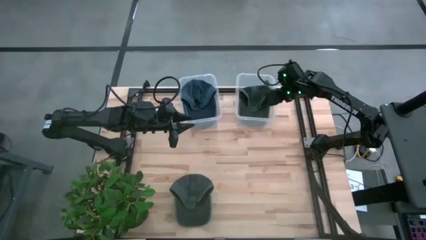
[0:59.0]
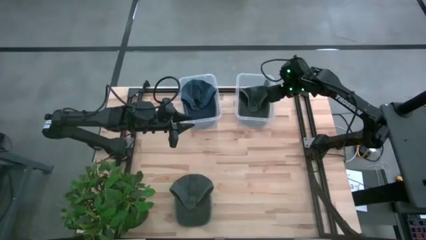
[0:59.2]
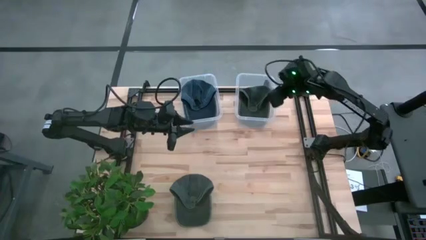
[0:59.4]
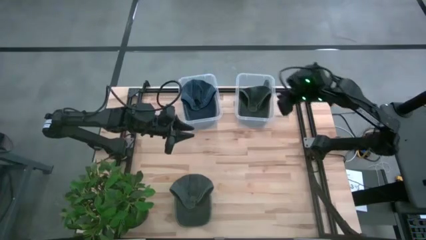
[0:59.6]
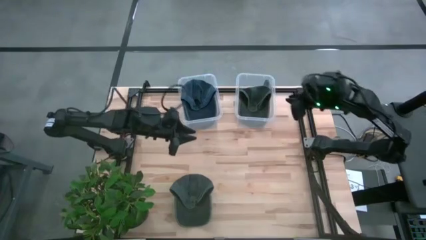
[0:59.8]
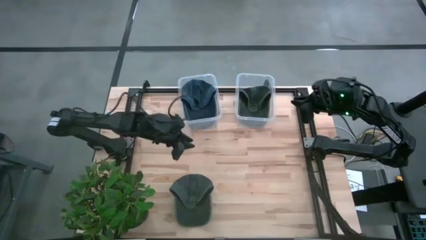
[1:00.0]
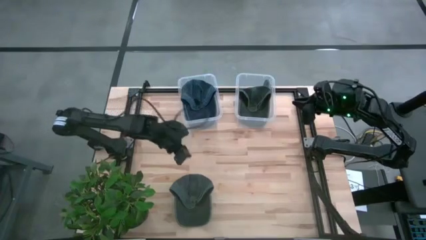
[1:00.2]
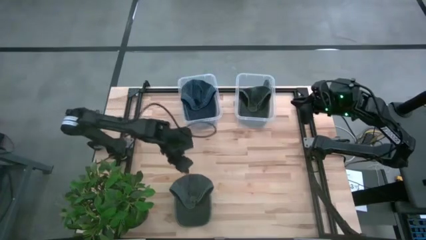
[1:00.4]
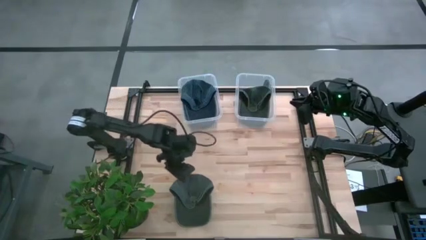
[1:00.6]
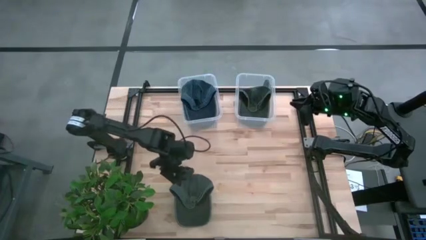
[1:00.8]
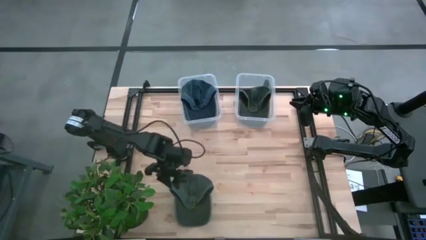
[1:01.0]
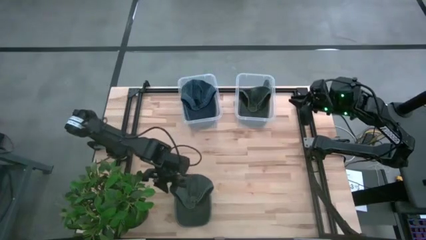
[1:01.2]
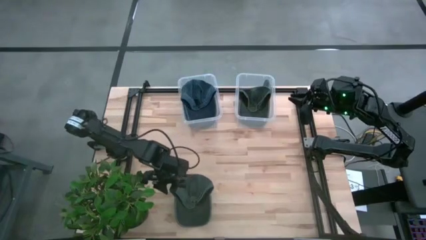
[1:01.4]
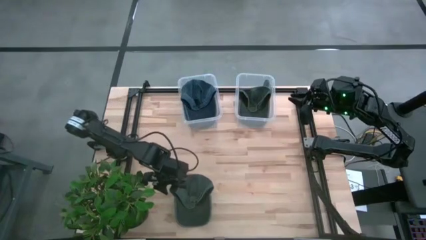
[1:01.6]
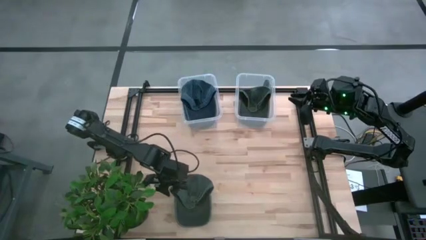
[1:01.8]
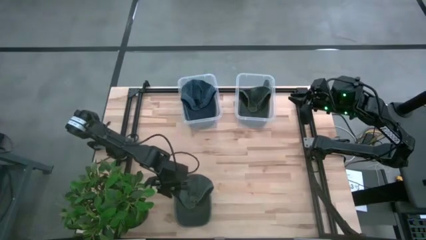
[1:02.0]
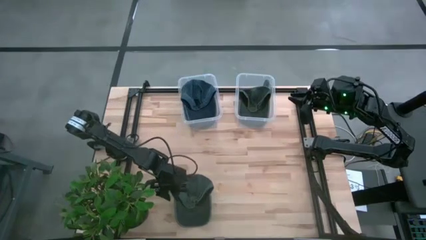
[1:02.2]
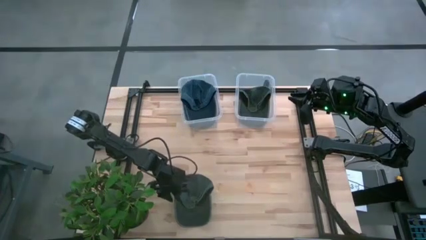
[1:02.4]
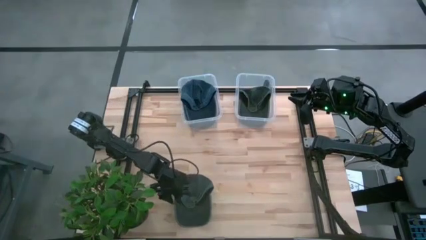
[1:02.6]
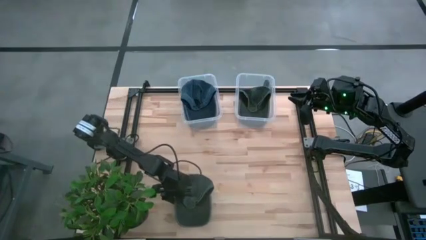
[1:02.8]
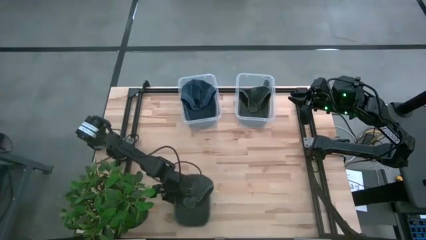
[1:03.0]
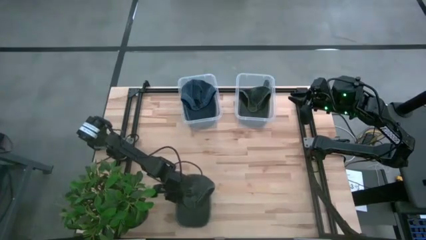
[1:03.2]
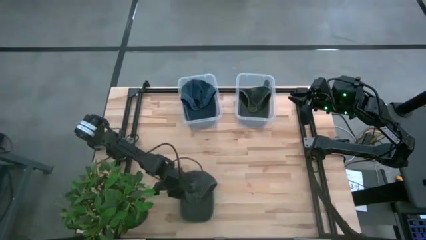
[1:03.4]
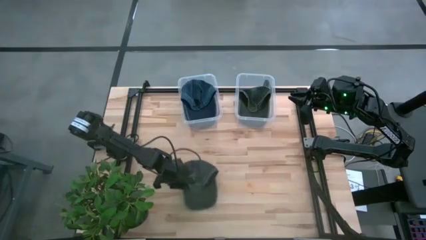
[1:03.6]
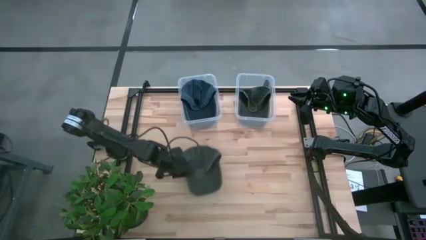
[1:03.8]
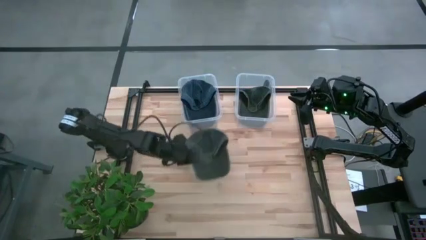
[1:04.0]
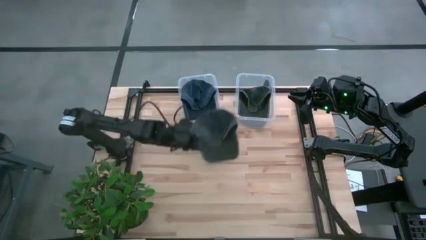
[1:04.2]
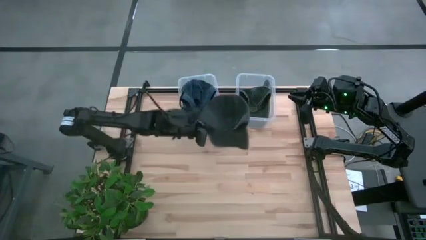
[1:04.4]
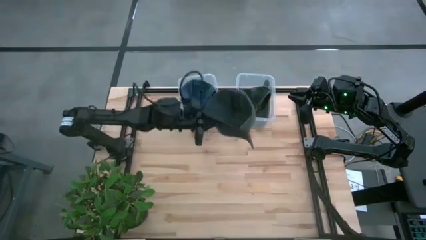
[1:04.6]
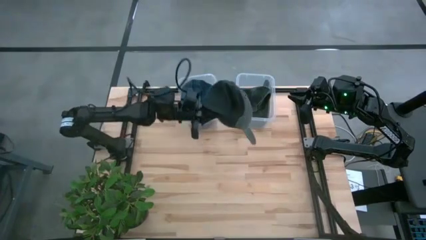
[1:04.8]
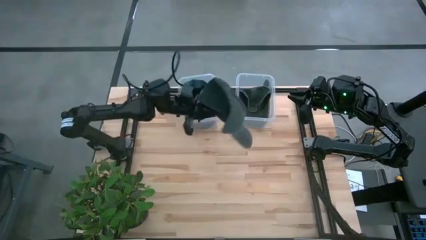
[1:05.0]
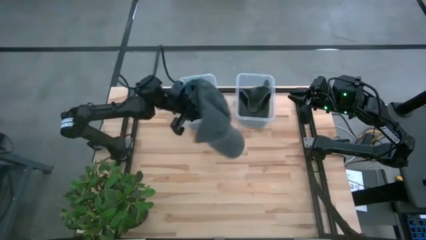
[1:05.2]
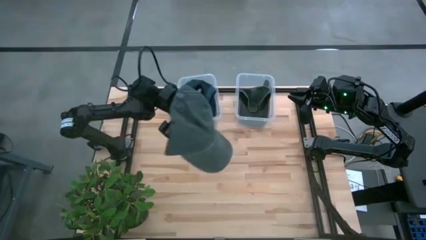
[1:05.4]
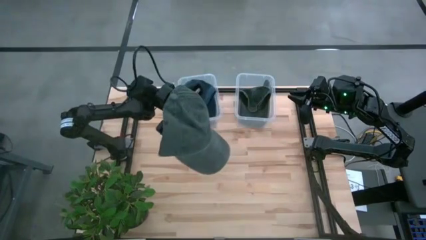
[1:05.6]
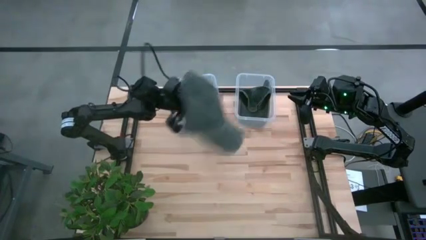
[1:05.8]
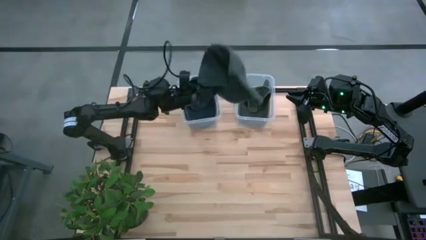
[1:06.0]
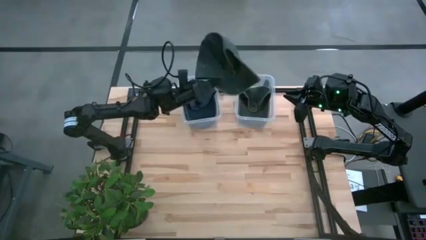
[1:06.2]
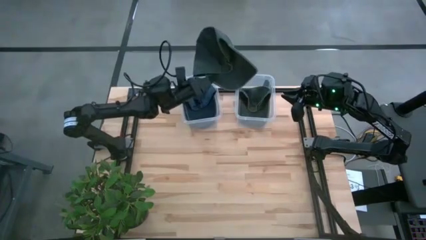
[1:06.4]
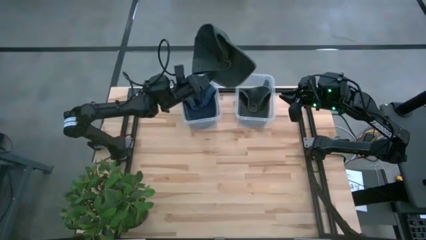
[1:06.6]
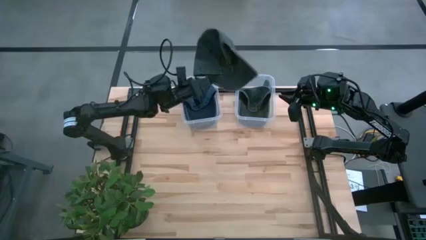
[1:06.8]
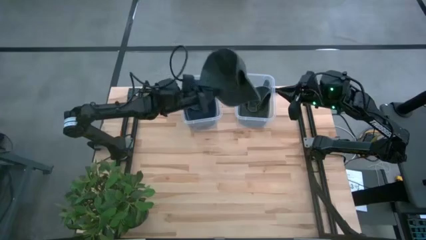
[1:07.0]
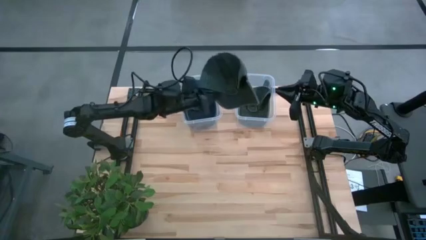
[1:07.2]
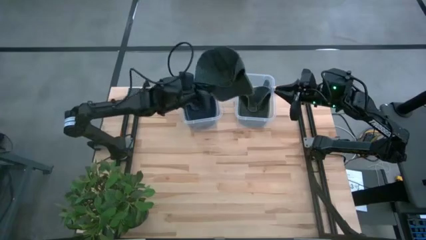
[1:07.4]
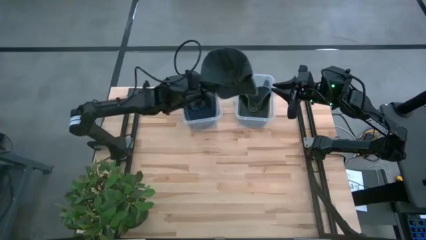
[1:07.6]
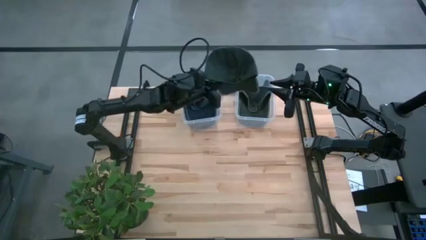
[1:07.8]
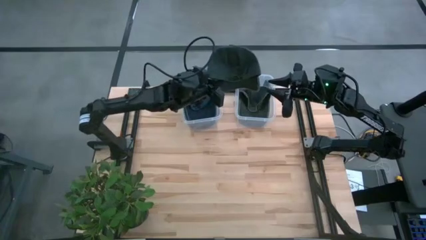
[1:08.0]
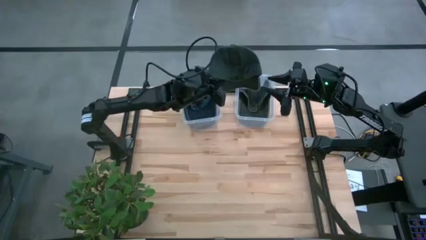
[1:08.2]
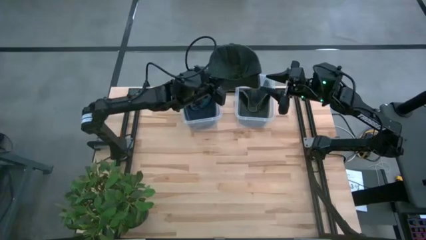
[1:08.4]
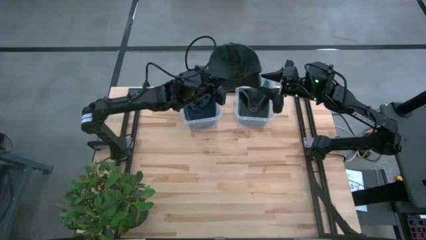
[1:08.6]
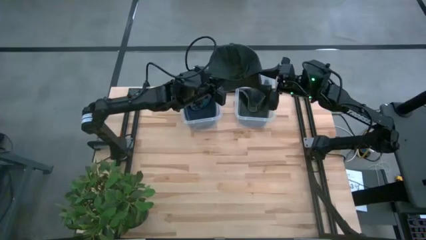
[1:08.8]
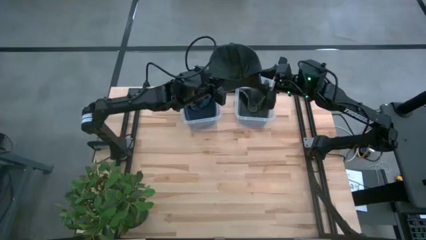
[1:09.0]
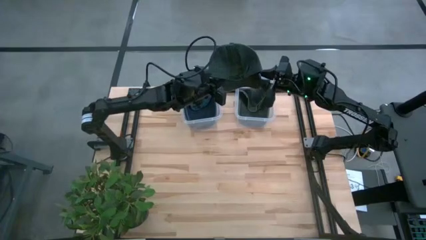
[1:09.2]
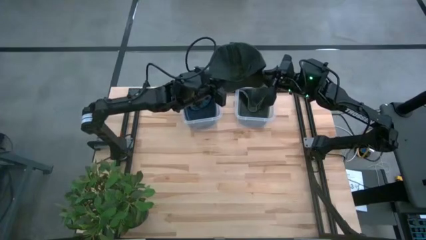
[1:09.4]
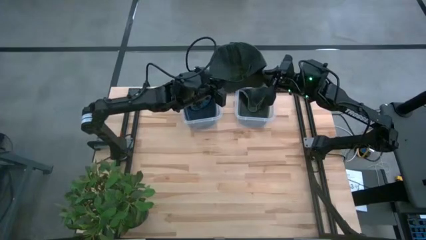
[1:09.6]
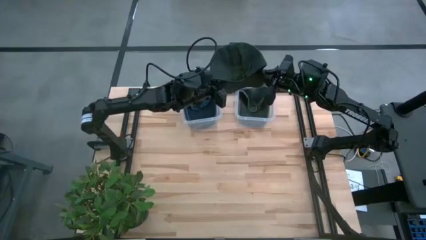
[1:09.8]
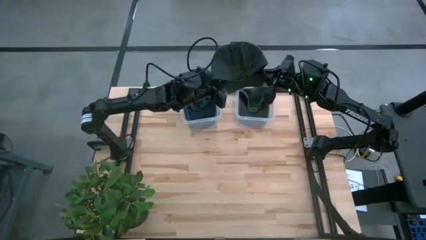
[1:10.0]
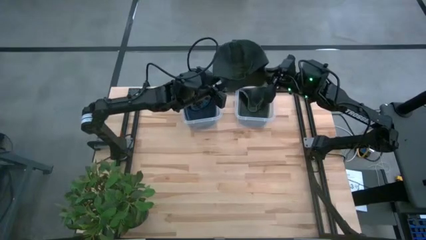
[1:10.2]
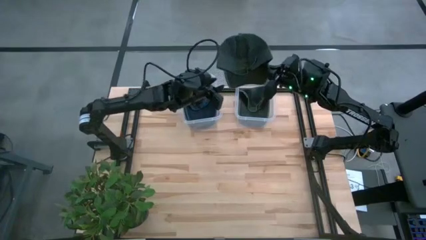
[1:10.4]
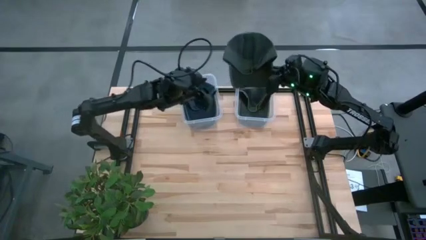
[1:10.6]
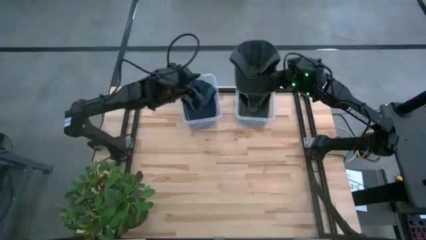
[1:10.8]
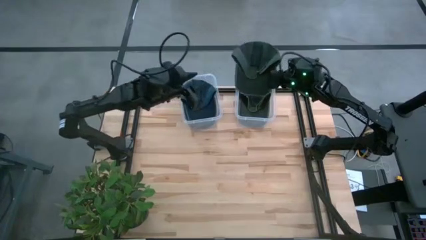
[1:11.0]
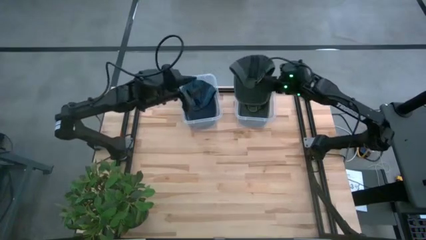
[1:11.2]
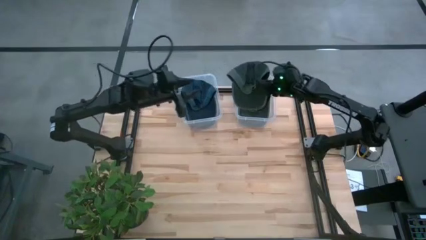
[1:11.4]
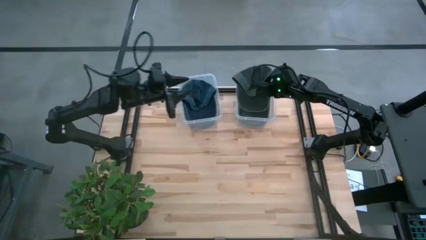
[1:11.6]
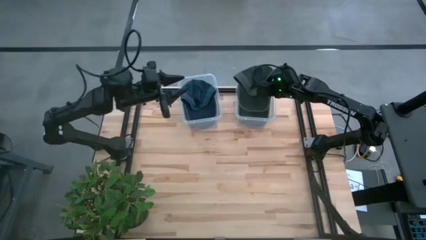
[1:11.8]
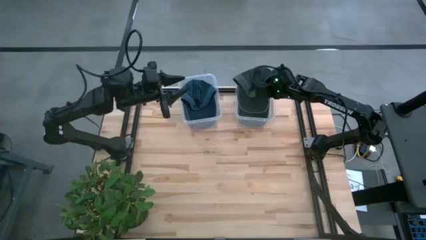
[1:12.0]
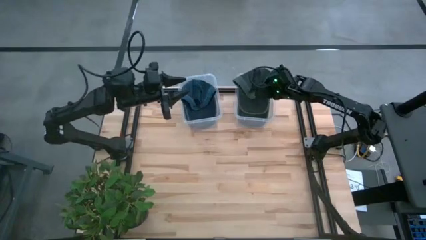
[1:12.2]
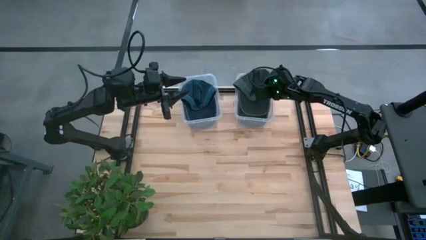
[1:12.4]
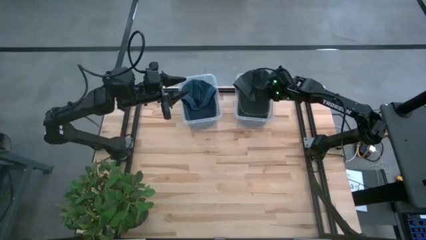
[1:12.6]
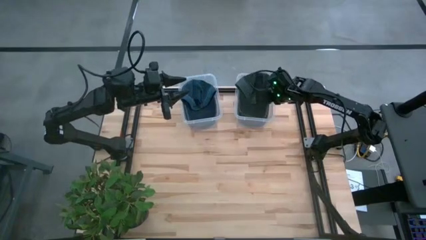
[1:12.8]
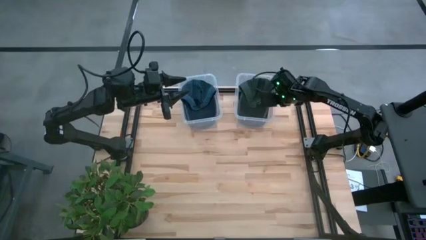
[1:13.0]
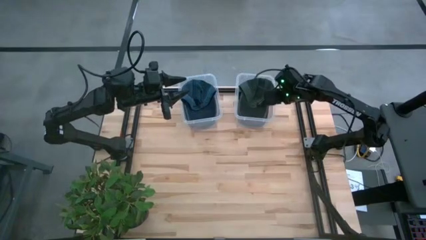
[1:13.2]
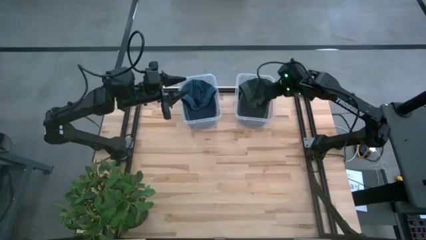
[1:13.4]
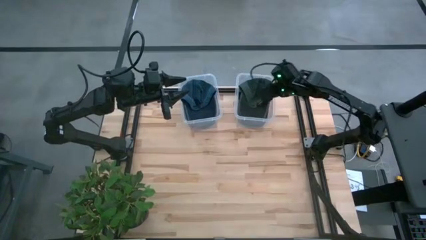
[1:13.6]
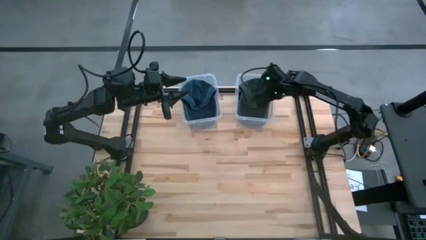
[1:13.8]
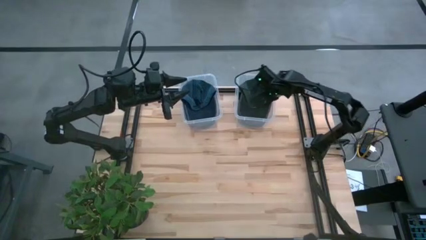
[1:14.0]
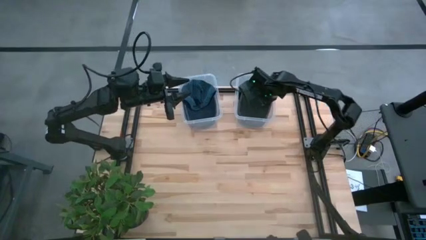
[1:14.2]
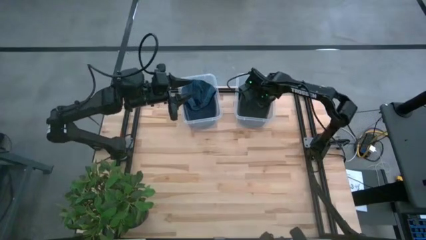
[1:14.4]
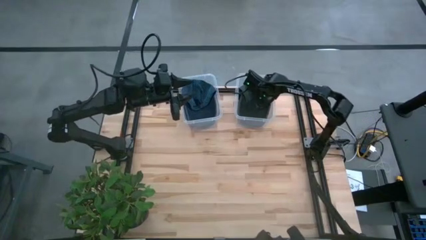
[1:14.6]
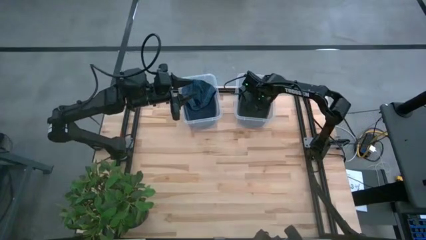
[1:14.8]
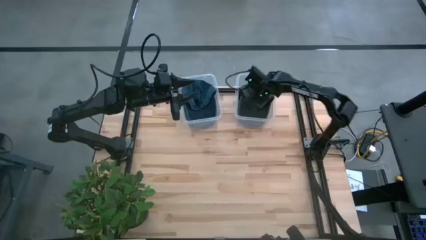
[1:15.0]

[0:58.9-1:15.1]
Task: Pick & Place hat
Put the gray cap into the right transparent bin
